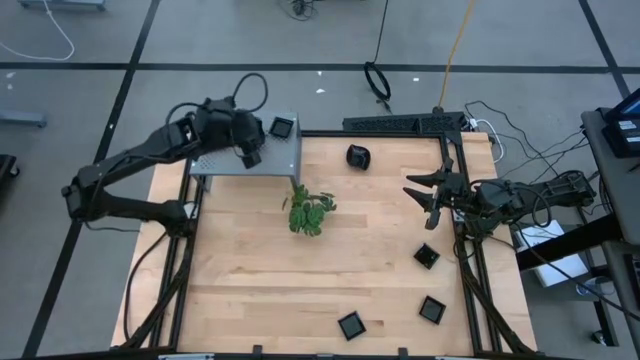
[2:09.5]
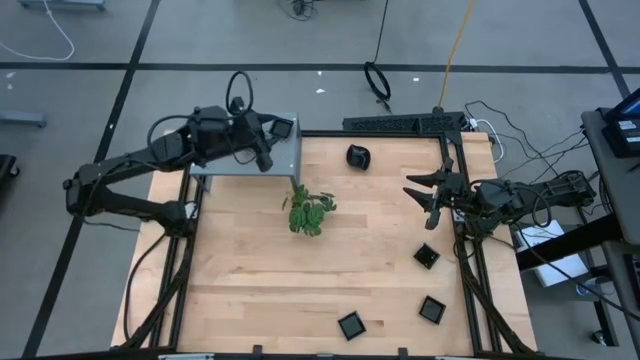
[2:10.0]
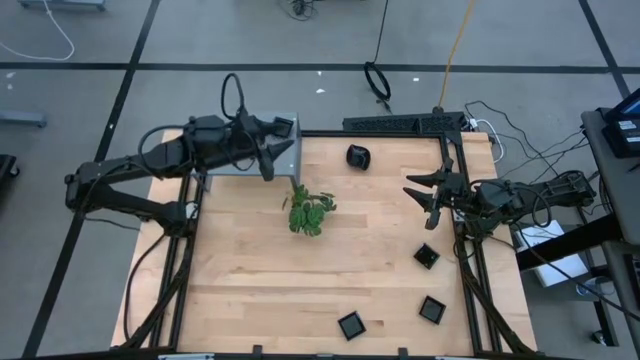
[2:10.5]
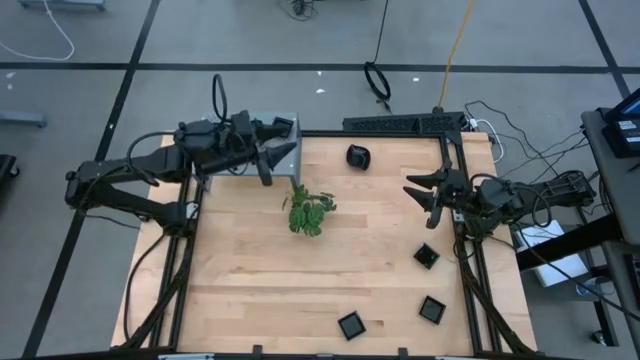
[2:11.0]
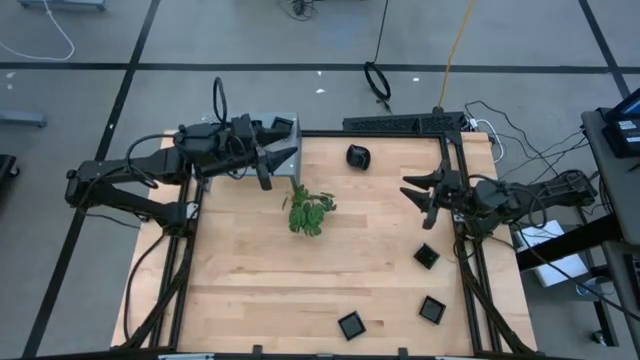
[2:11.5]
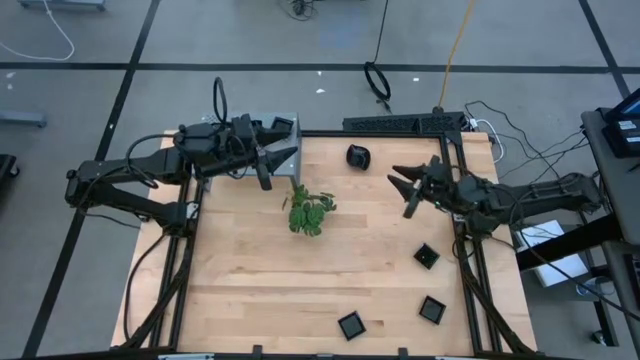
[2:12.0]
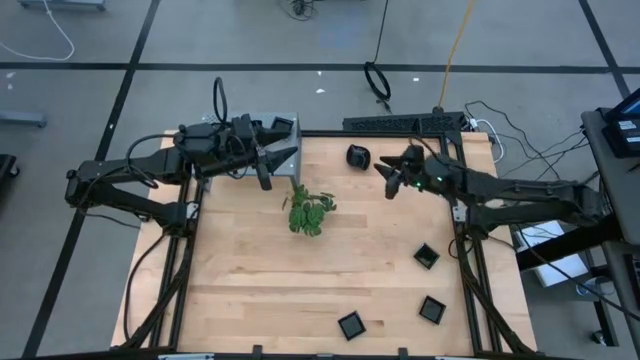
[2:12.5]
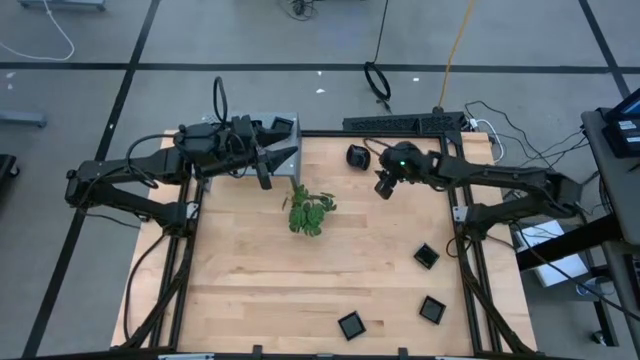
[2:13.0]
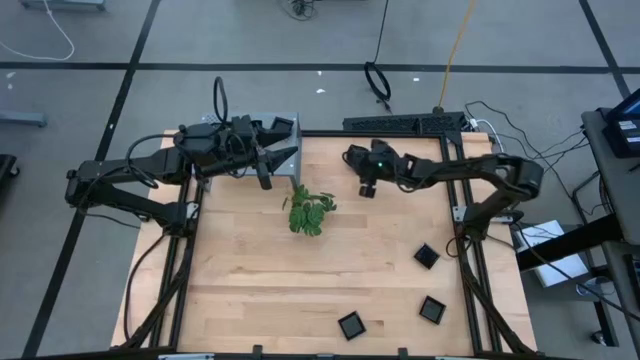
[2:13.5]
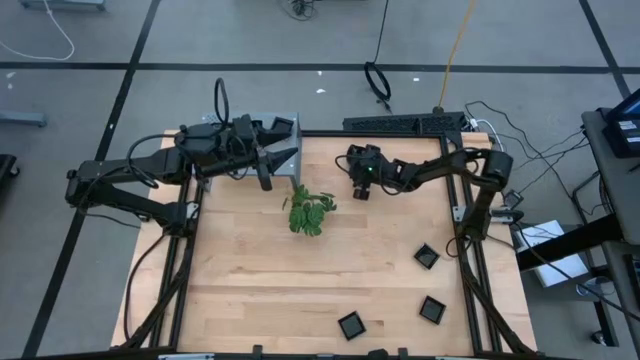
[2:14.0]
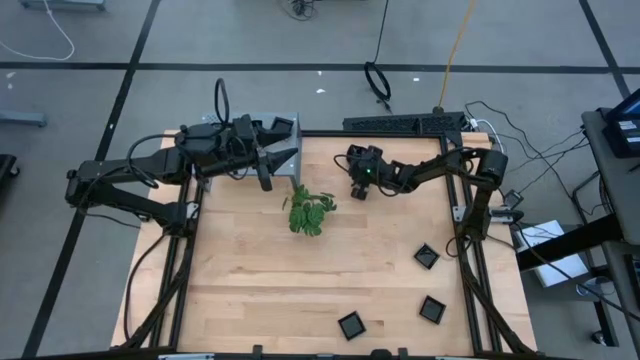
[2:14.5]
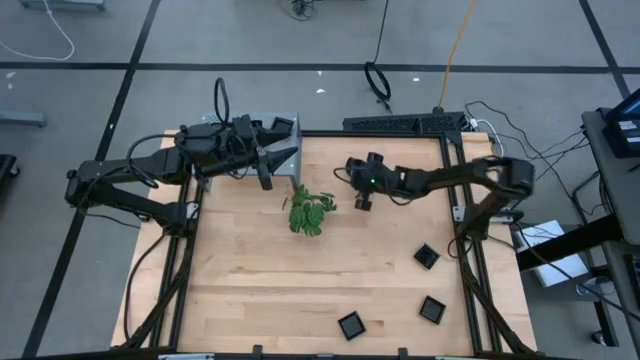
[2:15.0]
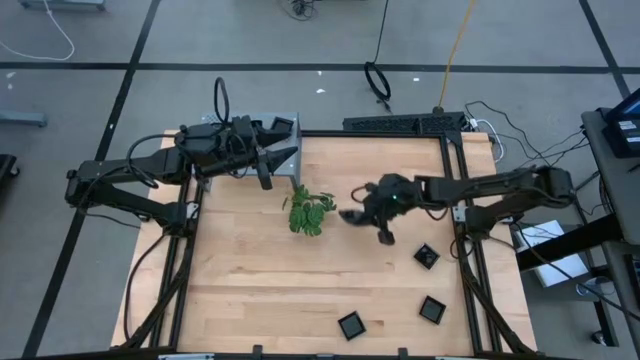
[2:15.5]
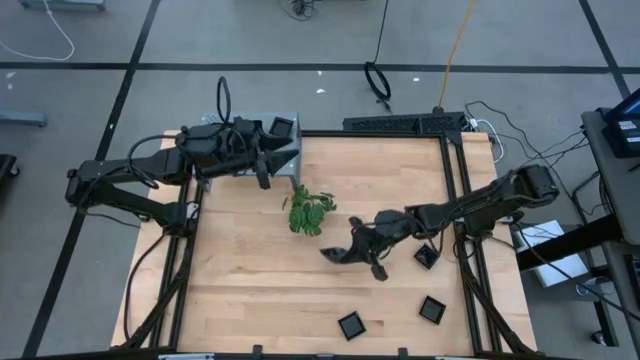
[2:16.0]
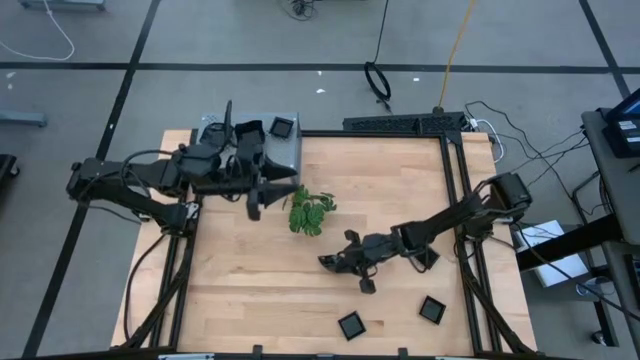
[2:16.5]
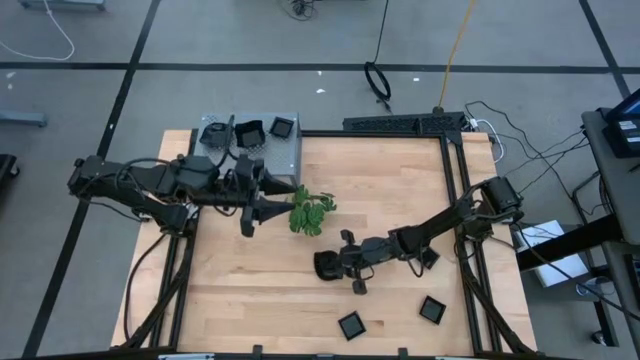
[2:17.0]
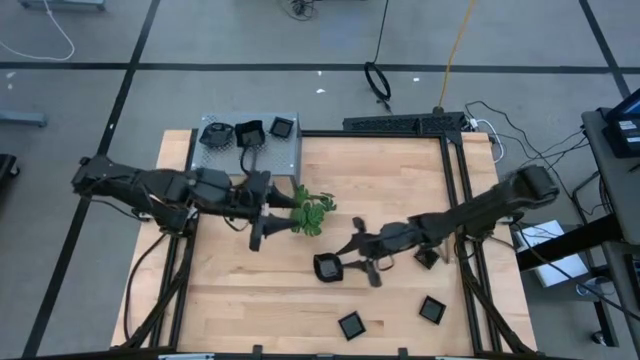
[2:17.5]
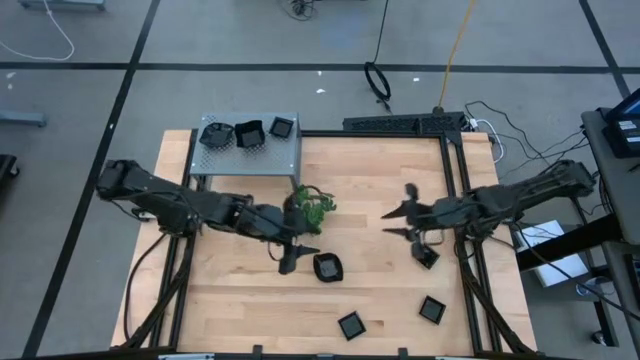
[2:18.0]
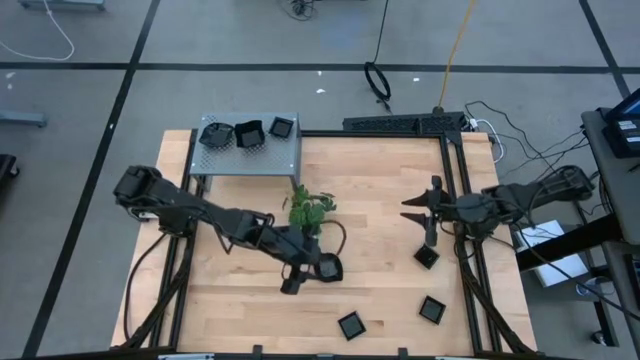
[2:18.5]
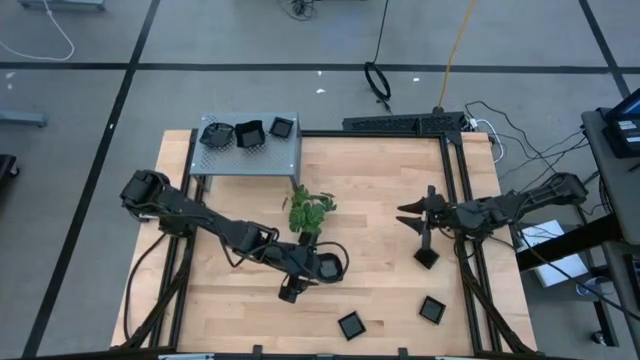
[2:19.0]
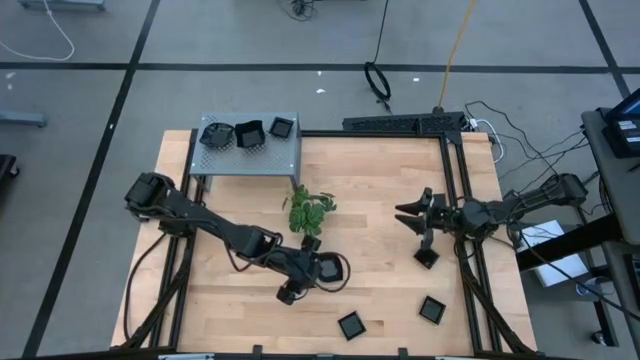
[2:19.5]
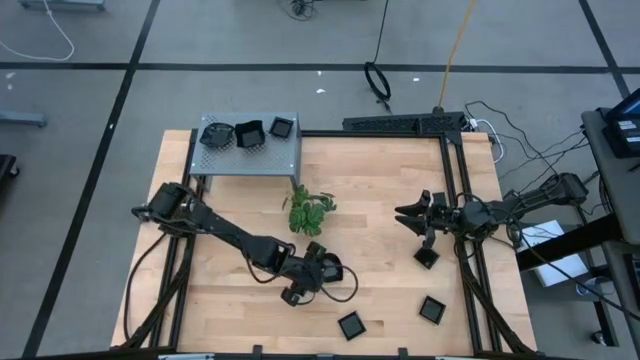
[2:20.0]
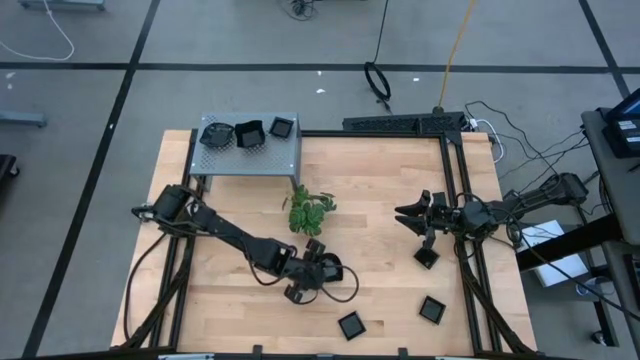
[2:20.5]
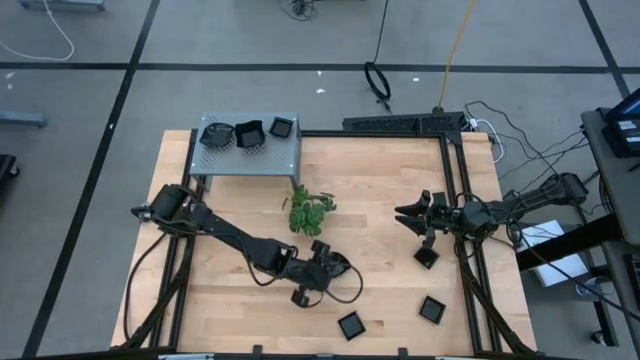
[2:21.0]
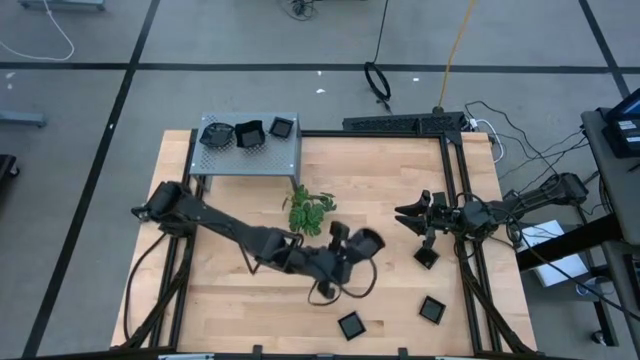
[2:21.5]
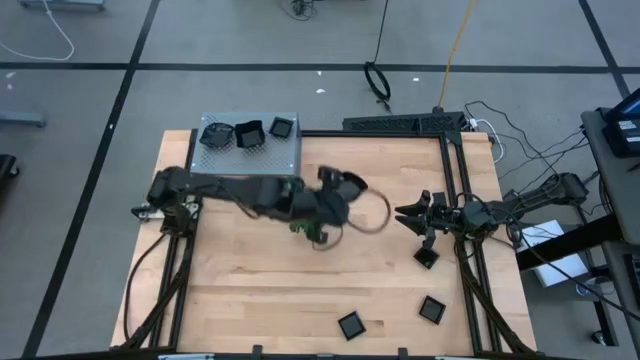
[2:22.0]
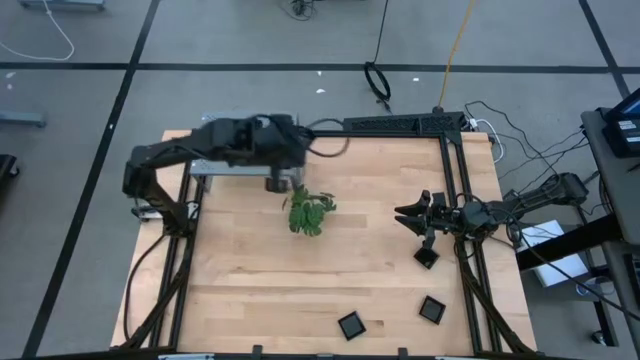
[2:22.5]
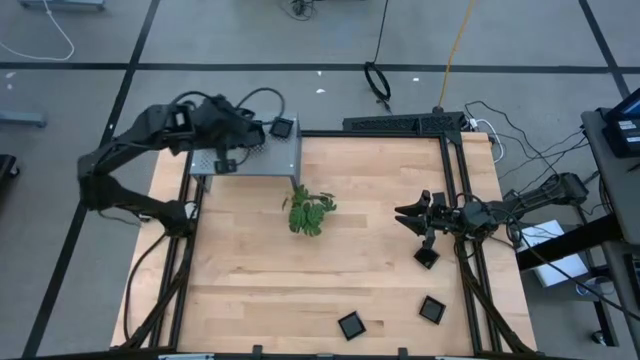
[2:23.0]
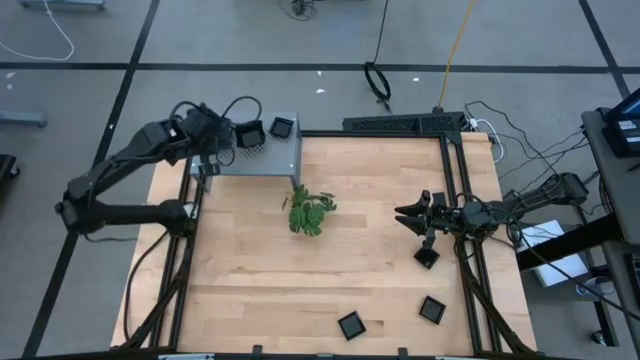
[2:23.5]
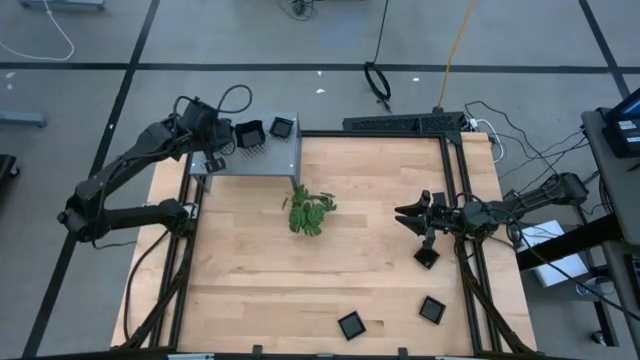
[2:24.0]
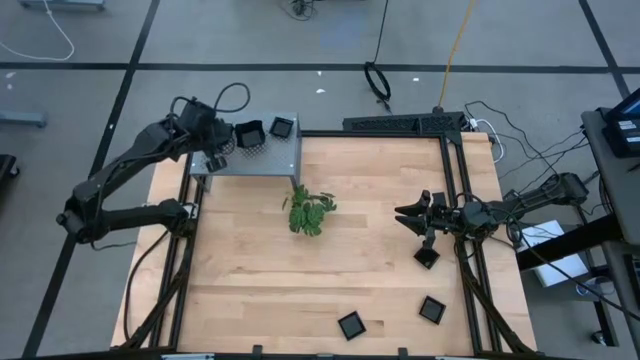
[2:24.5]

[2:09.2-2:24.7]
Task: Pick & Place Mini shaped plates
Stack the leaf shaped plate on top of the leaf shaped plate on the shelf

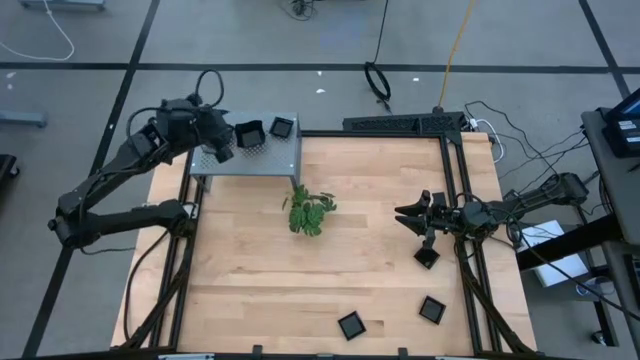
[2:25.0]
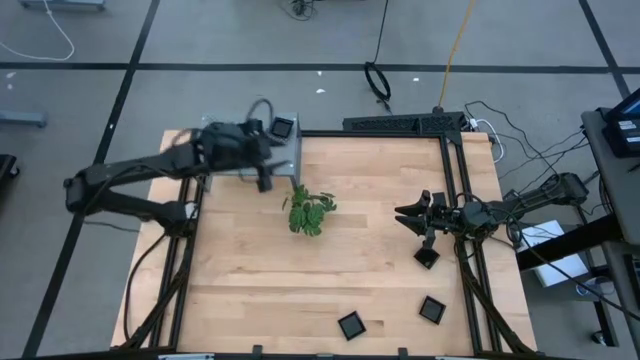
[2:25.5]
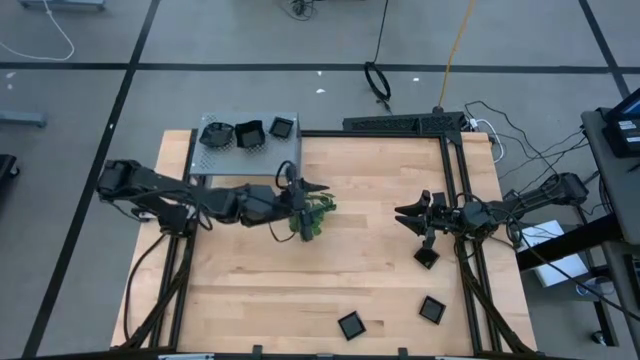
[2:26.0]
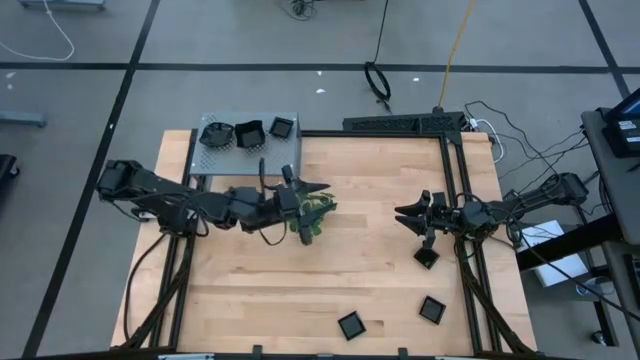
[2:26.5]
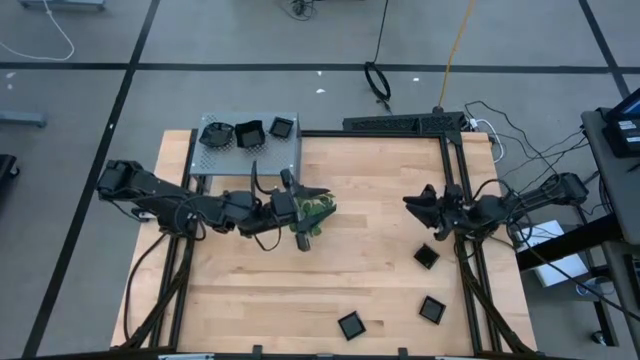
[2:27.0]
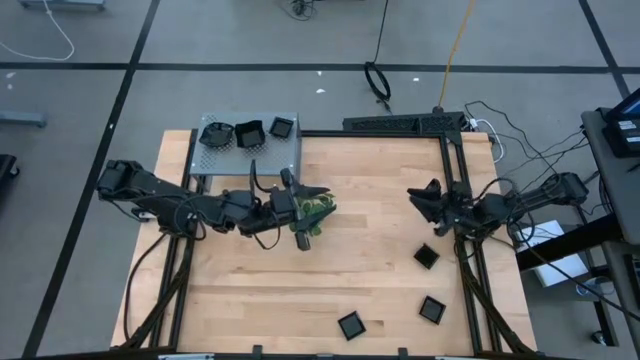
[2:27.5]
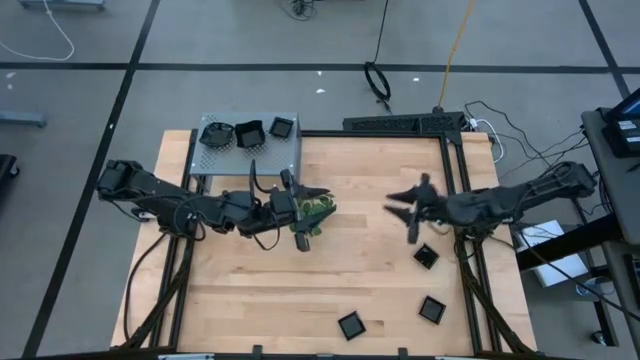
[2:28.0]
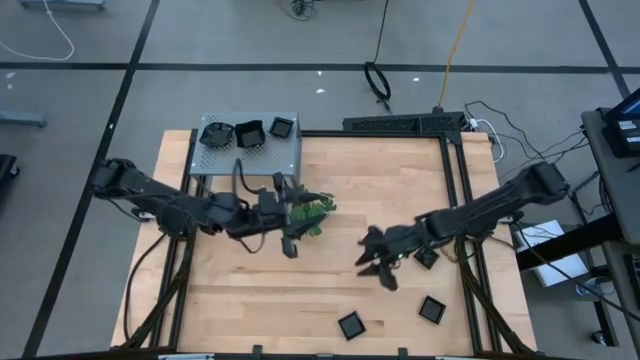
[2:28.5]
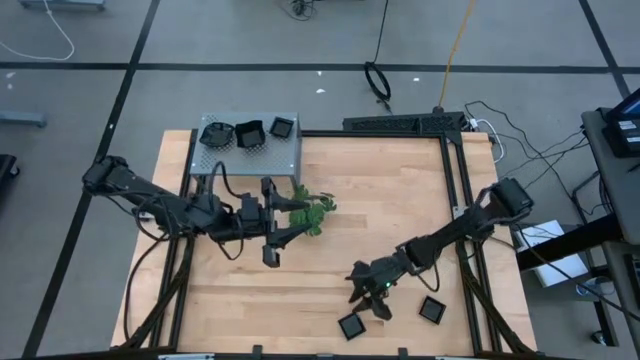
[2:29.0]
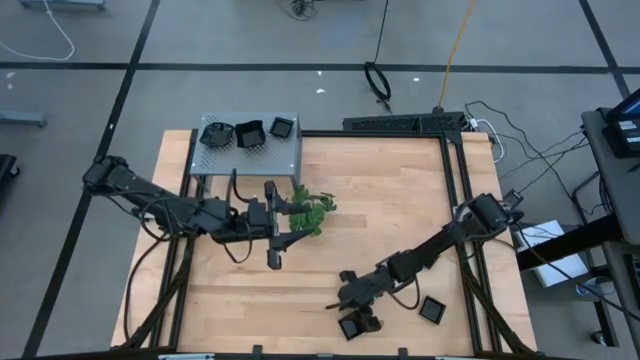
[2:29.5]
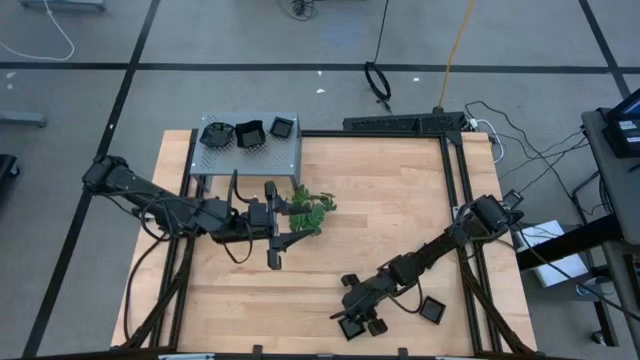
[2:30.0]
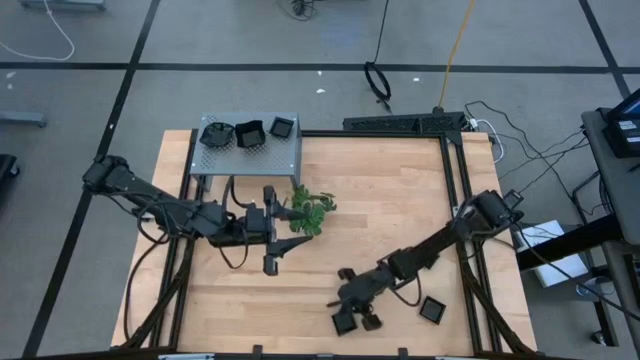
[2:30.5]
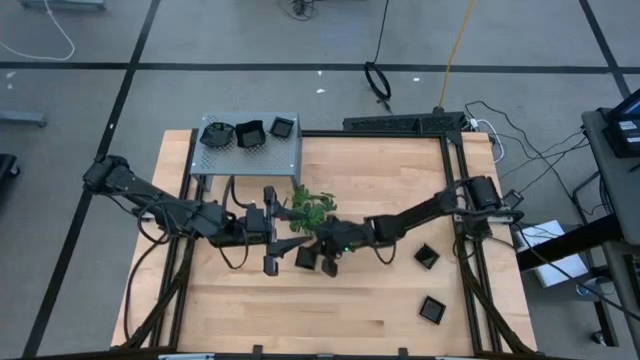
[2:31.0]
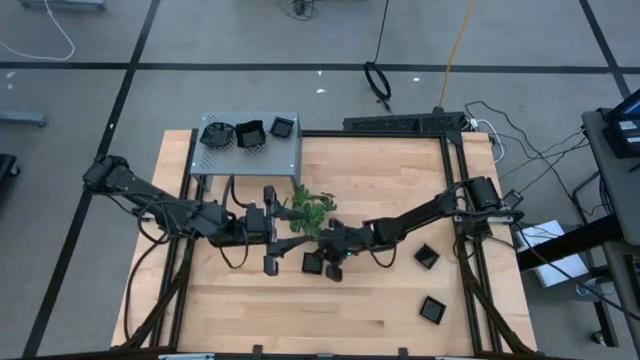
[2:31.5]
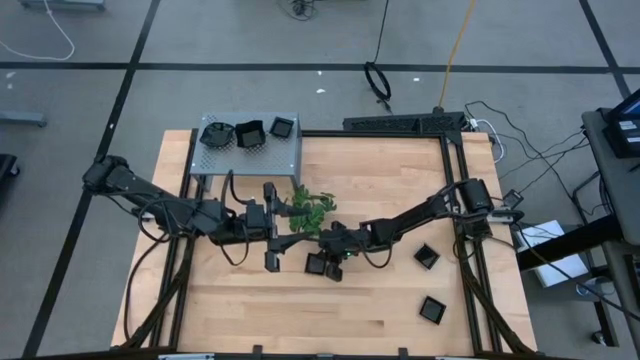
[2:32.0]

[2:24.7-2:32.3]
Move the square plate to the center of the table
